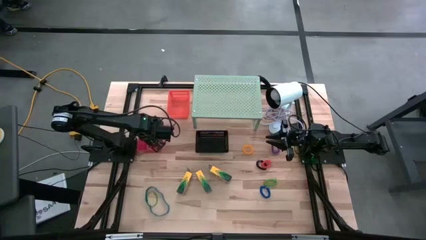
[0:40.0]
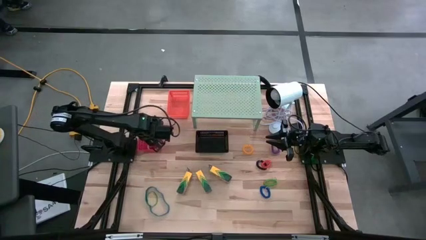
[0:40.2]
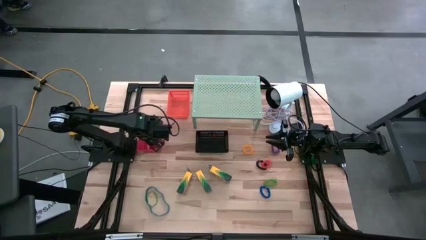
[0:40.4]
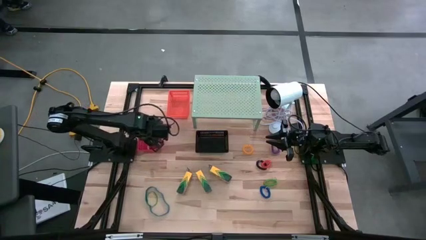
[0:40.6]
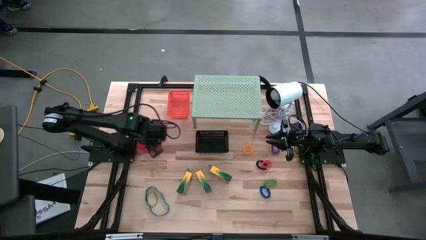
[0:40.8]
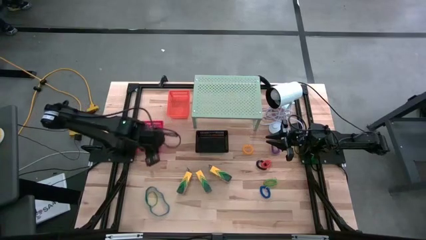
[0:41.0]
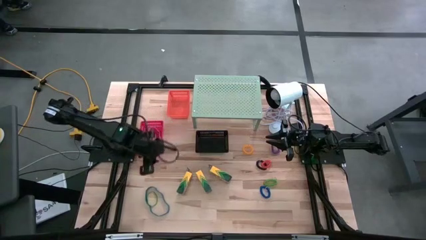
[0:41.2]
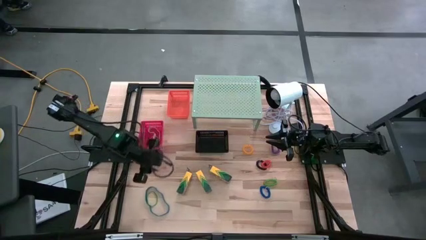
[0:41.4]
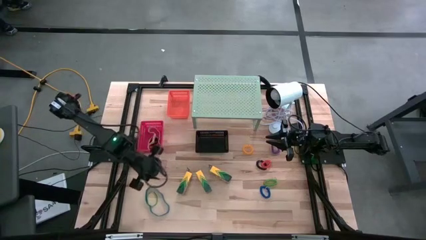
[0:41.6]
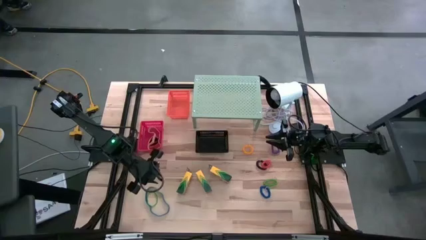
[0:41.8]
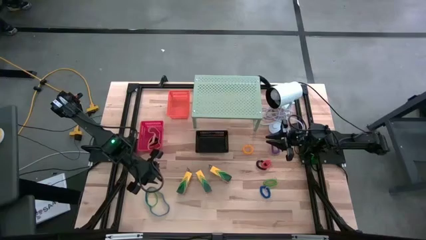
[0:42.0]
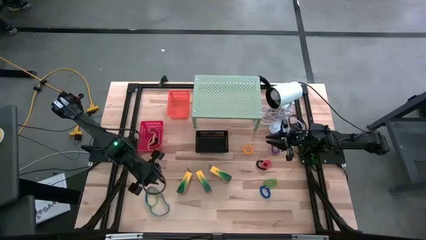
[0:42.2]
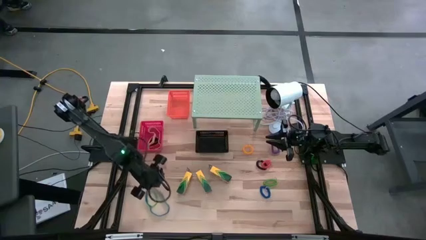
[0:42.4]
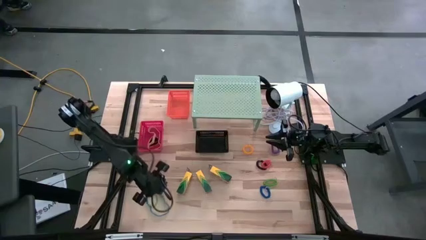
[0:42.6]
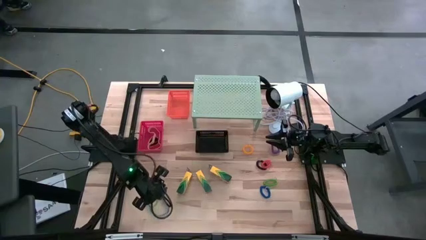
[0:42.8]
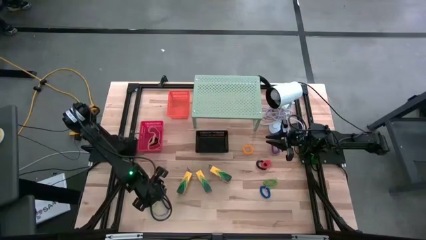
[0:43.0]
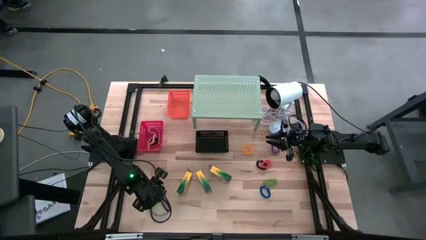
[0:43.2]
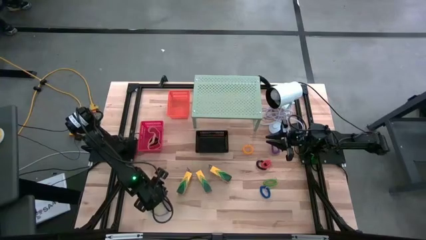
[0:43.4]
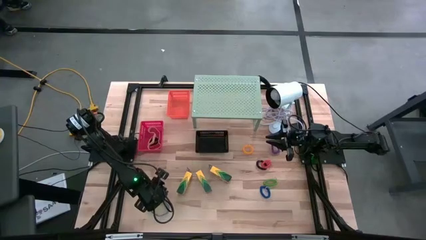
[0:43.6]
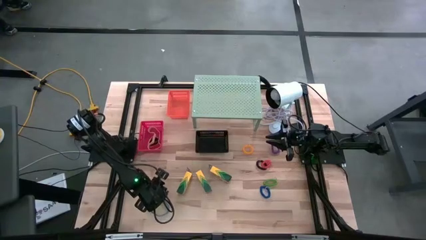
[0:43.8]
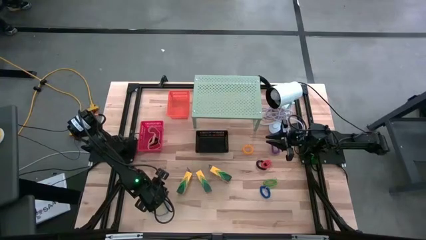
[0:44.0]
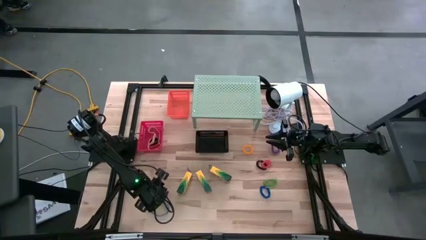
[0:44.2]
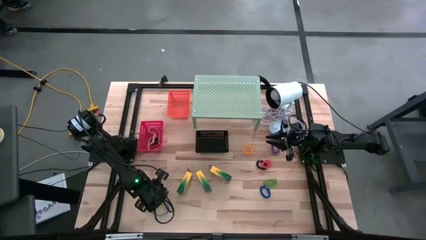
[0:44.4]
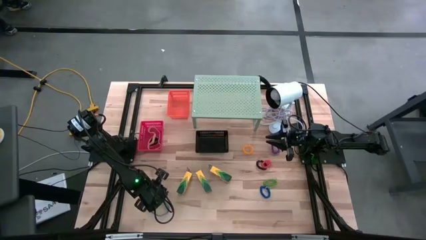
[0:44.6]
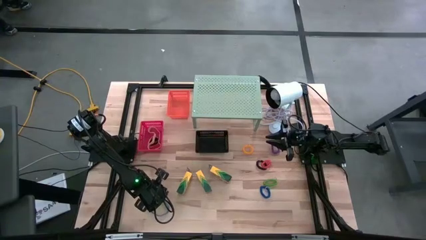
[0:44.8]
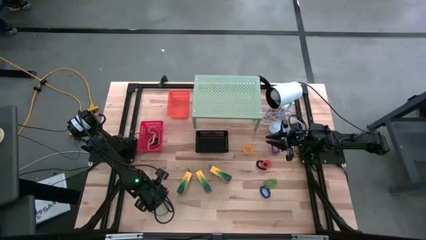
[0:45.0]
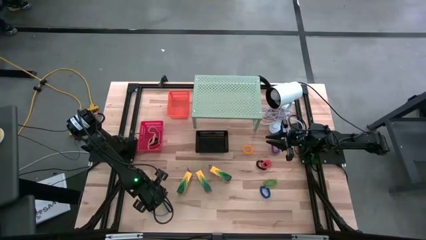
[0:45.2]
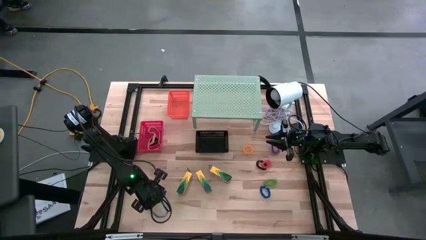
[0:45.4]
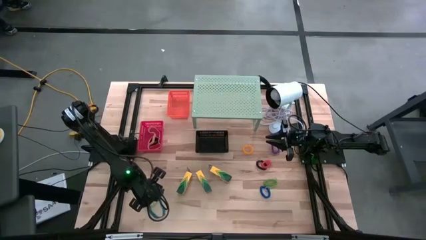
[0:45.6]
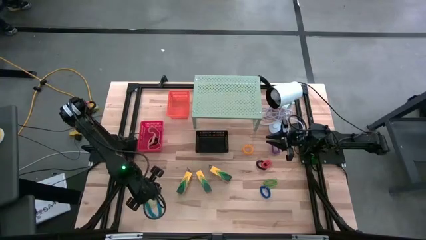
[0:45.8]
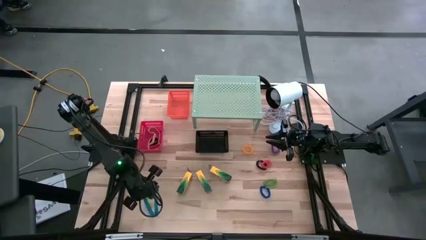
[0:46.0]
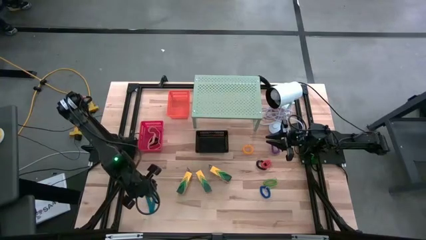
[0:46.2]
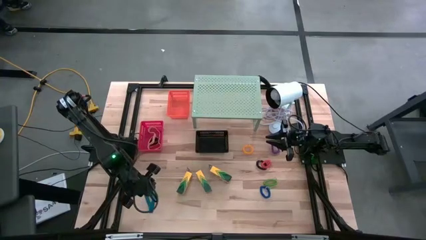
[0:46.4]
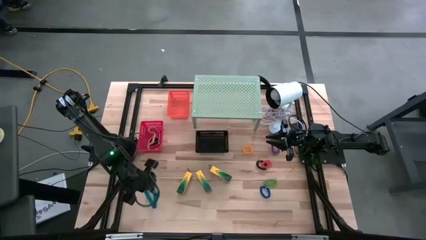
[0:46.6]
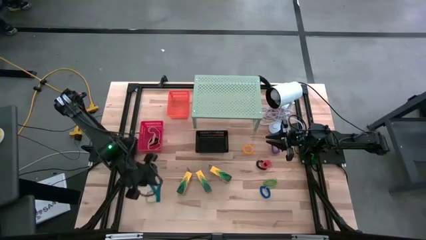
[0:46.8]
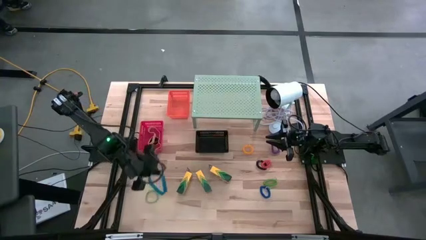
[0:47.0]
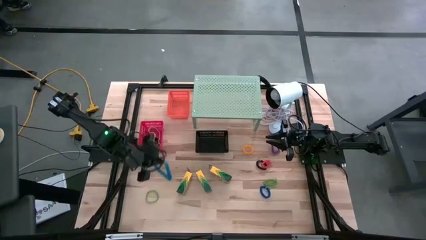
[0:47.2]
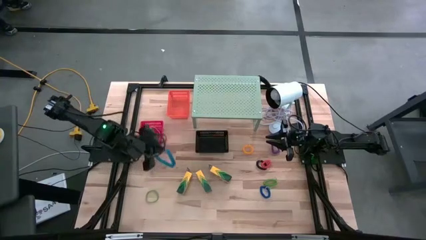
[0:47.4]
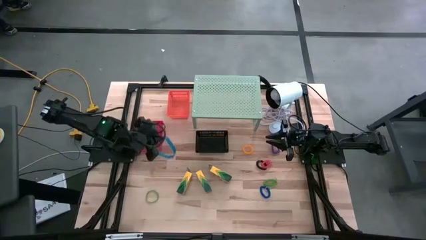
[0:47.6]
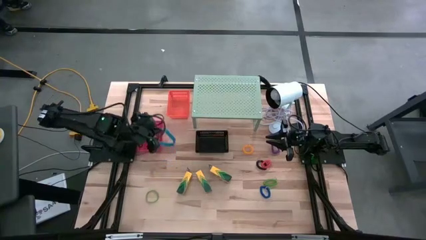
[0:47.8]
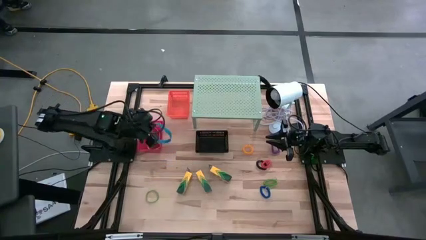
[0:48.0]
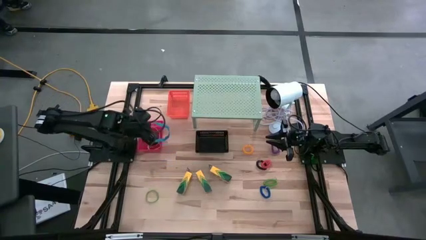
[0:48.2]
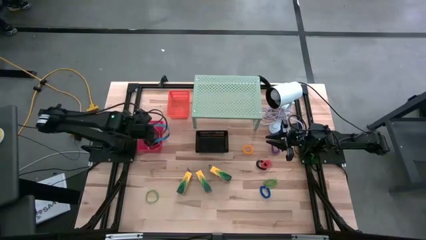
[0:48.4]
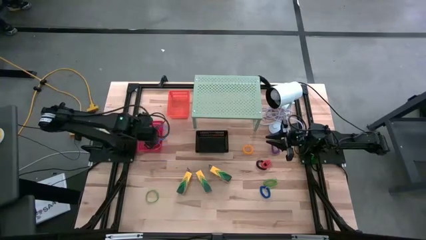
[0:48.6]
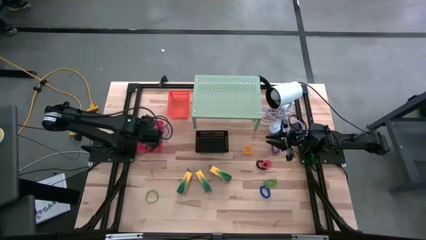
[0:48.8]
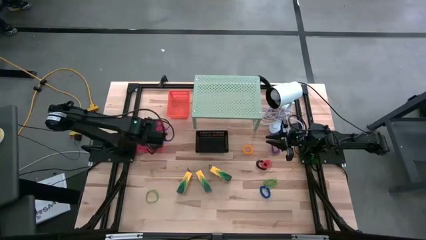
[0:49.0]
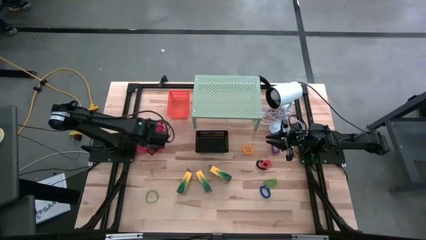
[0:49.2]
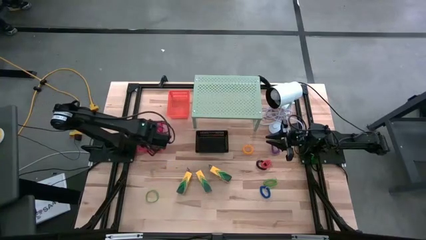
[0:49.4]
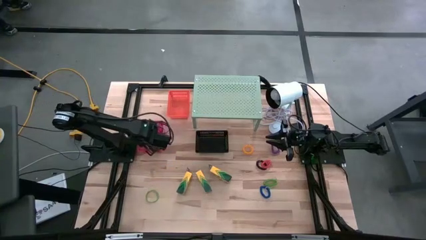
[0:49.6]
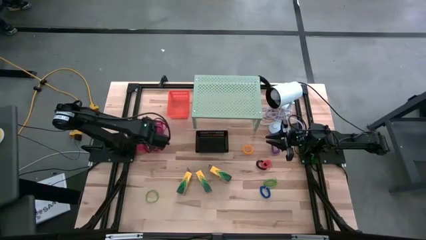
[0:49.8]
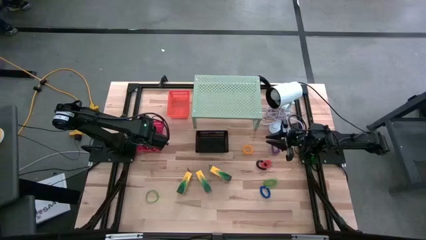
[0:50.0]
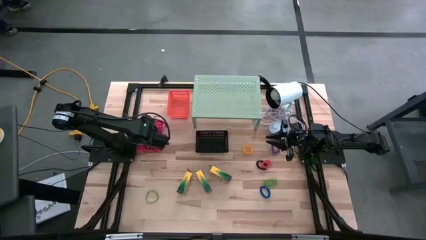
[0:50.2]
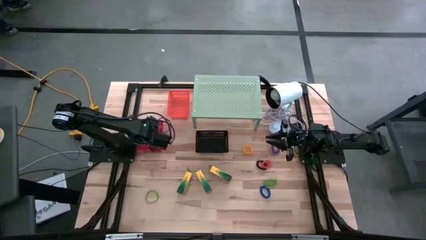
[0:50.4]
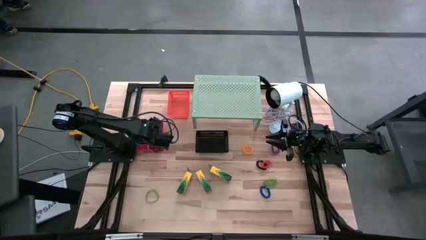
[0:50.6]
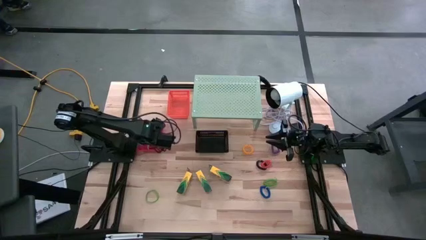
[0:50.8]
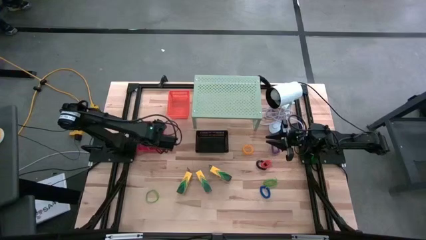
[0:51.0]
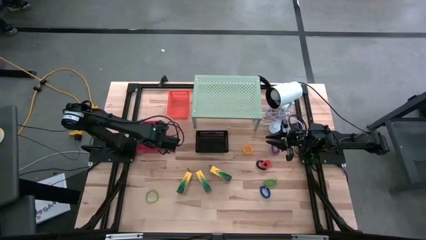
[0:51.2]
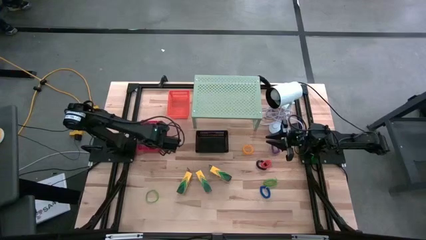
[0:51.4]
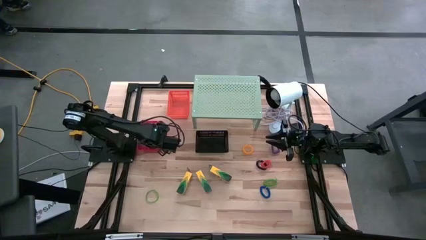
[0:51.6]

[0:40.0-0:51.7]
Task: Pick & Place Office Desk Supplies
Put the blue rubber band into the orange bin on the shelf

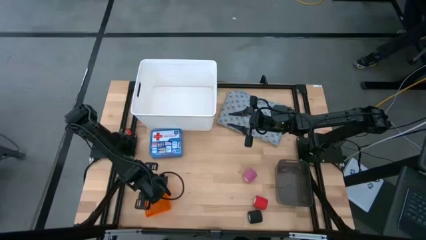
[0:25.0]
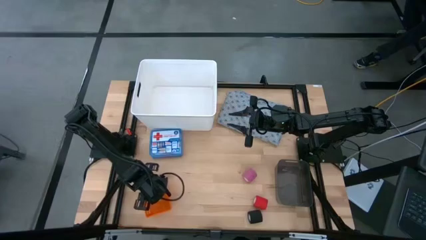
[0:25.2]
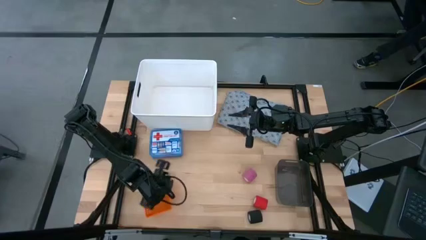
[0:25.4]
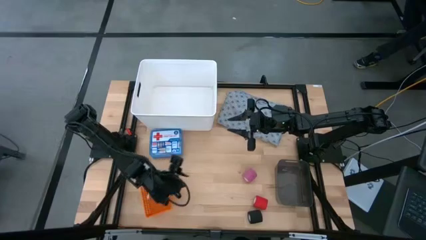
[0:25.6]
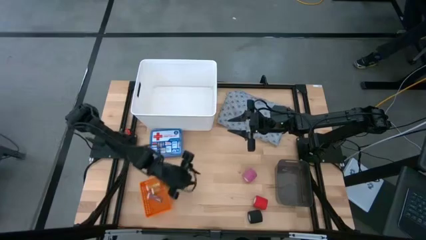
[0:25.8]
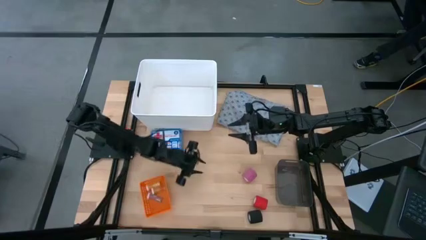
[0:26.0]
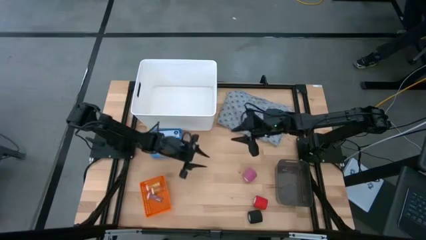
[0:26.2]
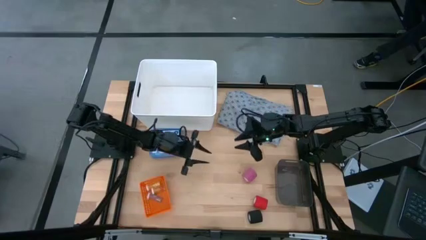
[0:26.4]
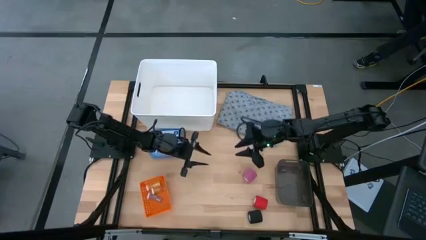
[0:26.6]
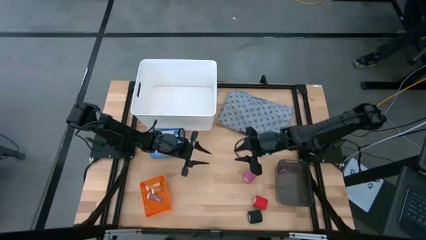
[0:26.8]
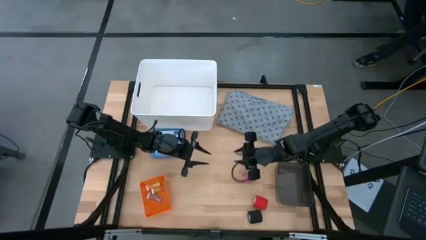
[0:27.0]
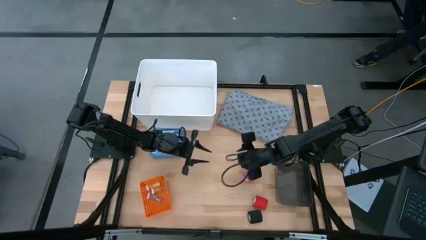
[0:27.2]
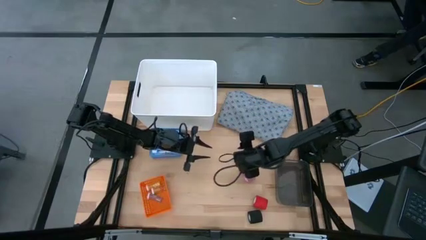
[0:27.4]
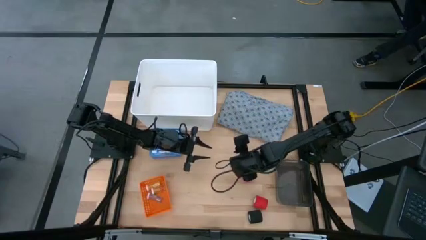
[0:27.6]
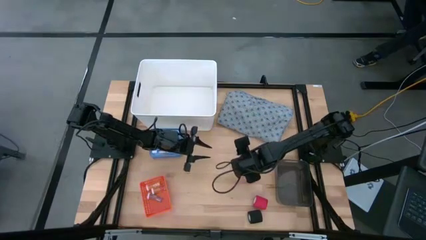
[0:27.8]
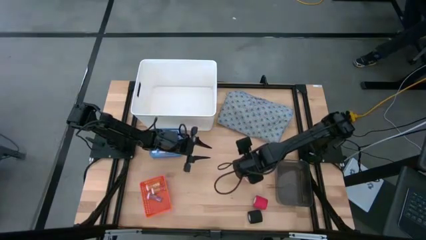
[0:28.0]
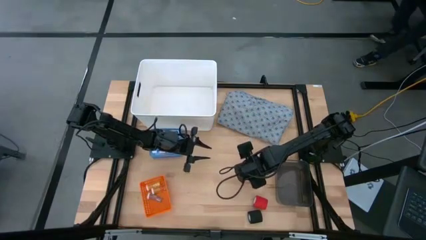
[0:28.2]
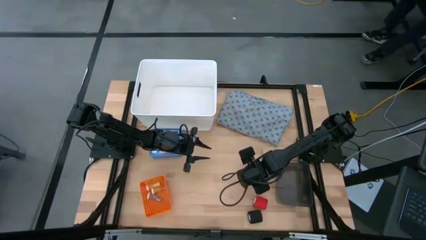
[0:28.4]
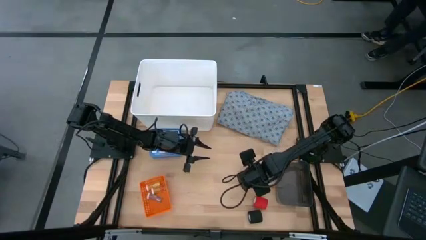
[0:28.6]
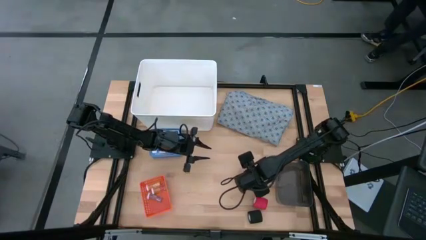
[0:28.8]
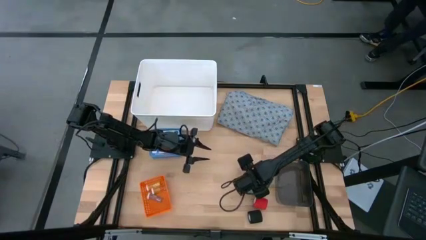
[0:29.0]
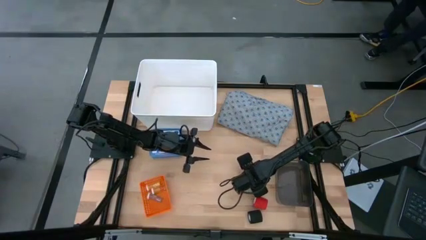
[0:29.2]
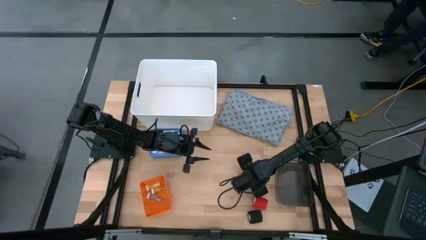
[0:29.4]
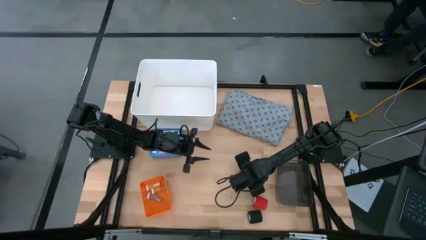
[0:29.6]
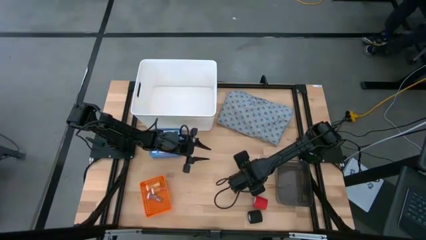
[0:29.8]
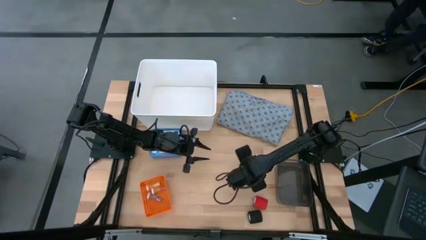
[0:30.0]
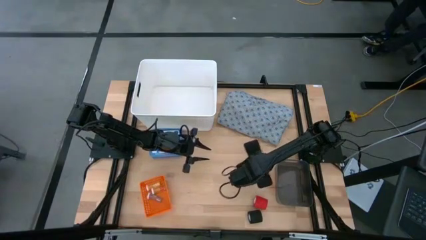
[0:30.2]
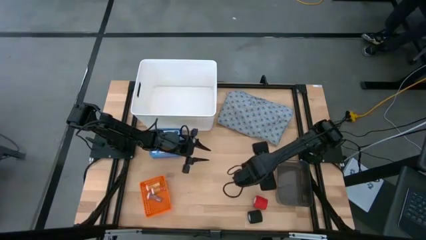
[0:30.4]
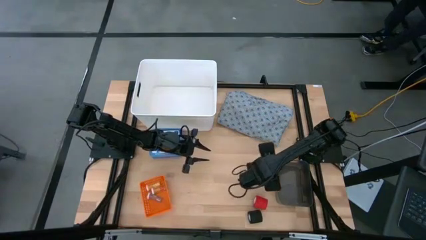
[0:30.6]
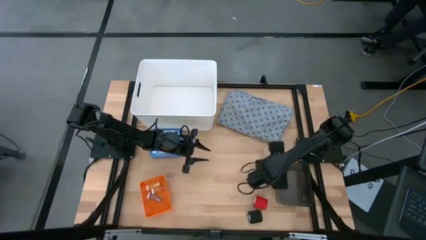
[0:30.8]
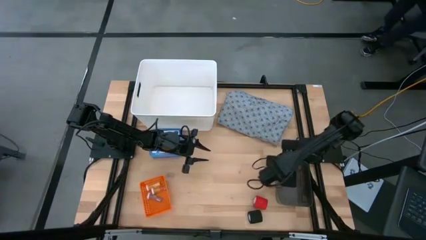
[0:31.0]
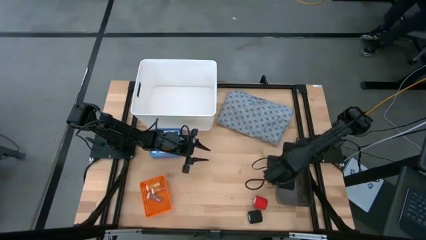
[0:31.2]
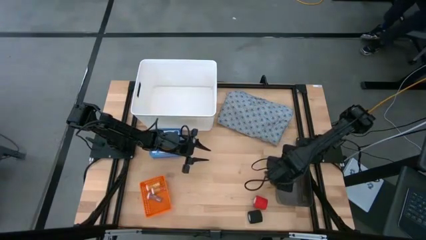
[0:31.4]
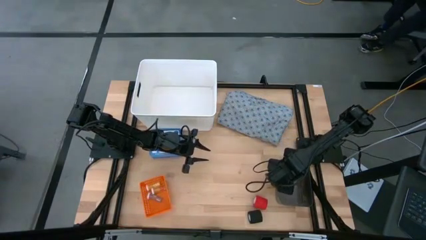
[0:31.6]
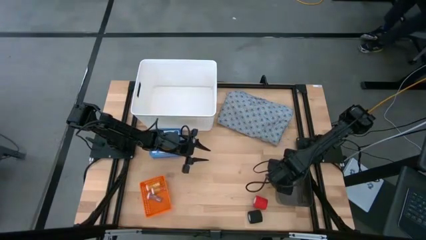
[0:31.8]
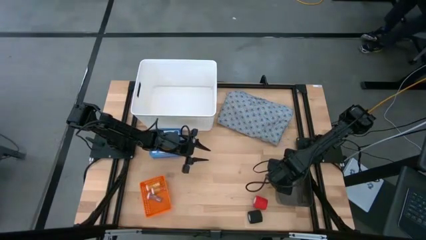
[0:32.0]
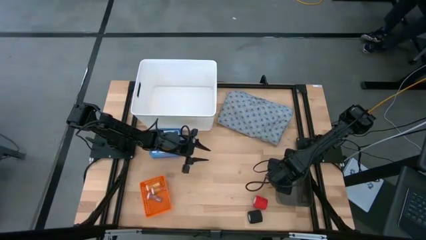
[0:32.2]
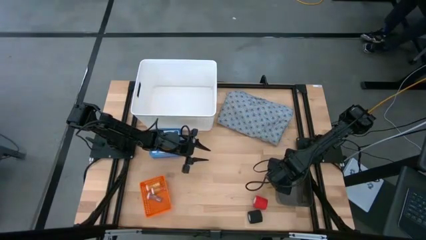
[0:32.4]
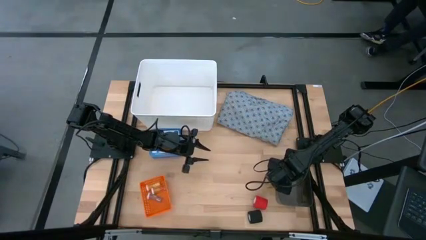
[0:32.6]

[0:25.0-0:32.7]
Task: Pick & place medical supplies in basket/bin
Put the pink bandage into the black bin
